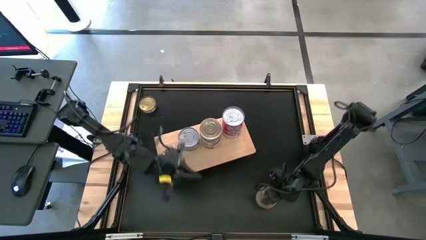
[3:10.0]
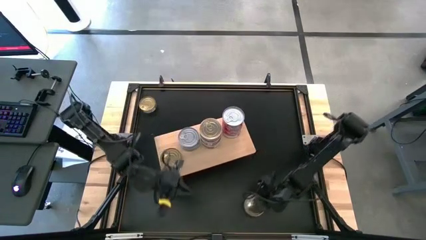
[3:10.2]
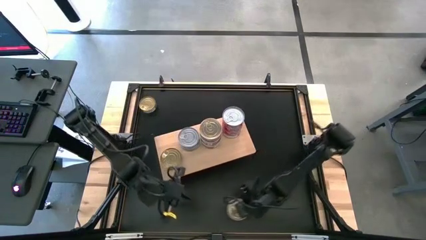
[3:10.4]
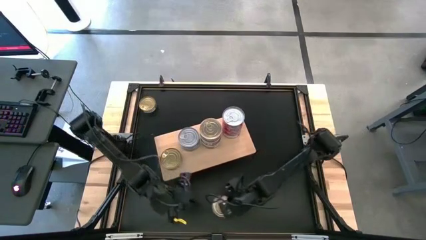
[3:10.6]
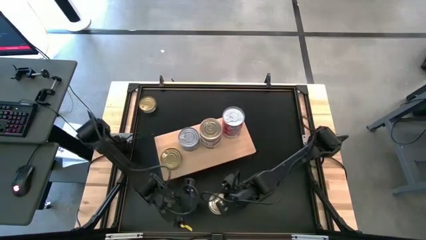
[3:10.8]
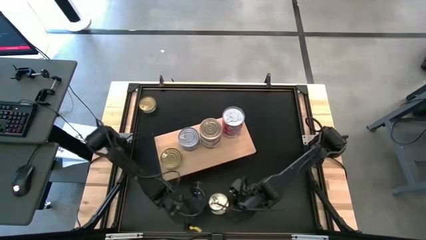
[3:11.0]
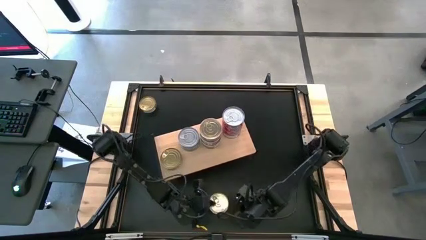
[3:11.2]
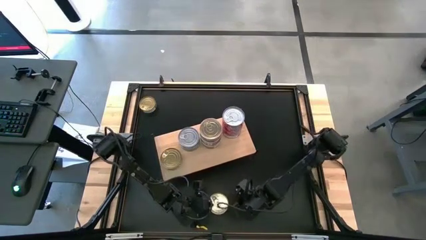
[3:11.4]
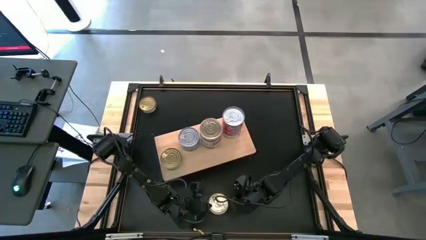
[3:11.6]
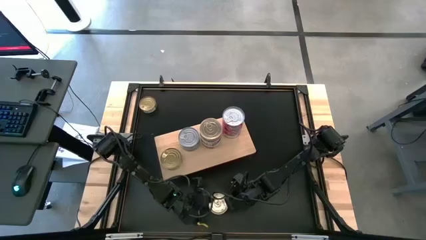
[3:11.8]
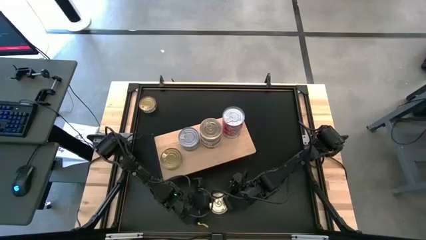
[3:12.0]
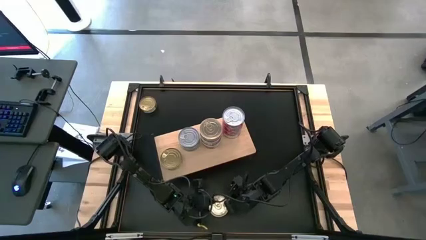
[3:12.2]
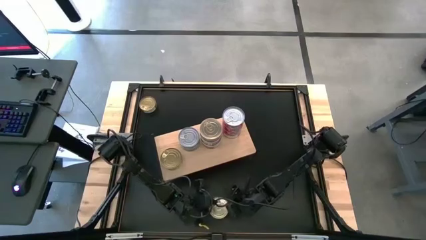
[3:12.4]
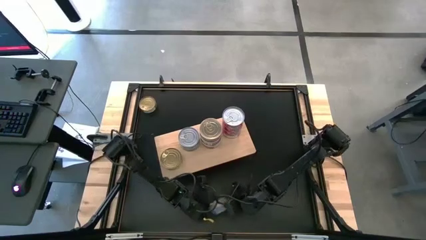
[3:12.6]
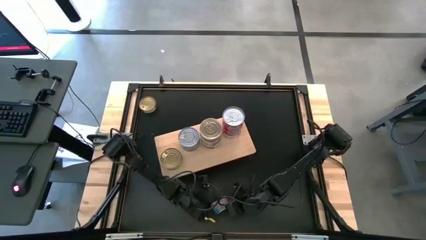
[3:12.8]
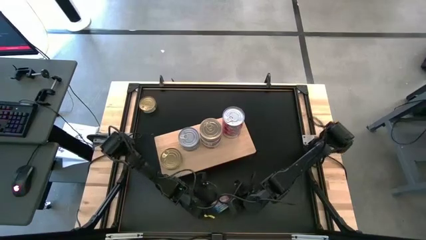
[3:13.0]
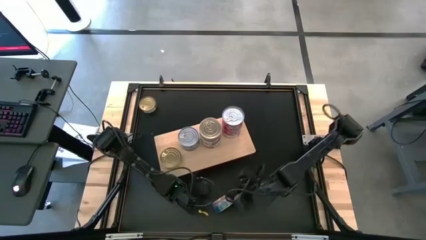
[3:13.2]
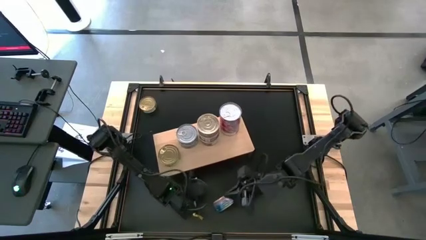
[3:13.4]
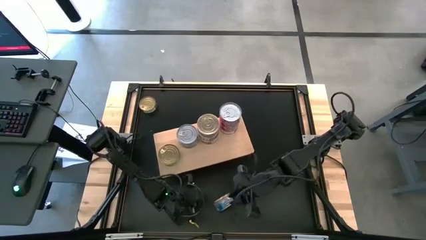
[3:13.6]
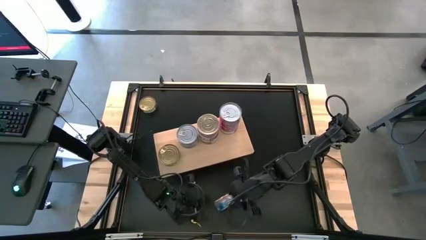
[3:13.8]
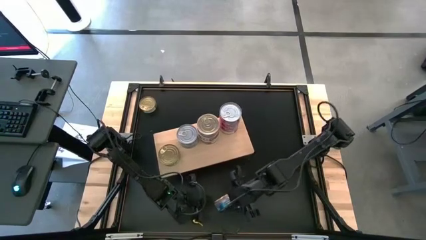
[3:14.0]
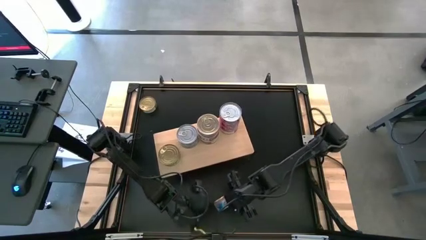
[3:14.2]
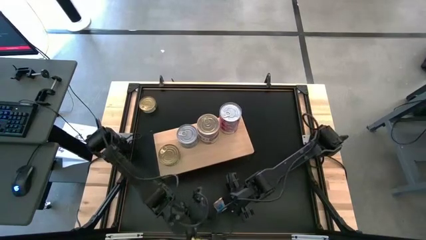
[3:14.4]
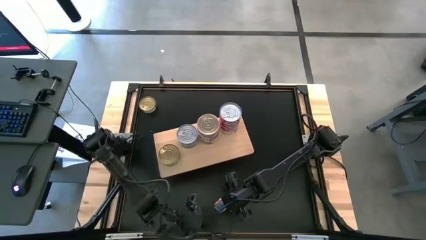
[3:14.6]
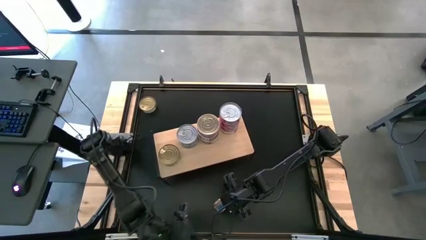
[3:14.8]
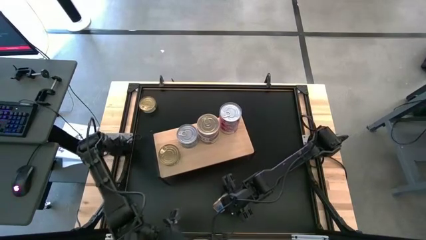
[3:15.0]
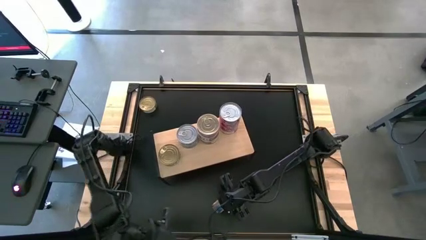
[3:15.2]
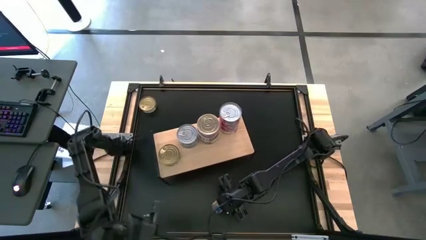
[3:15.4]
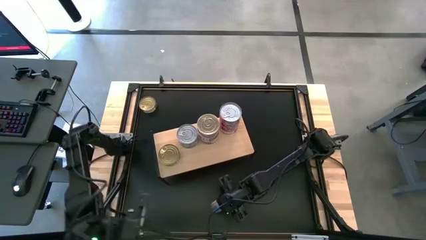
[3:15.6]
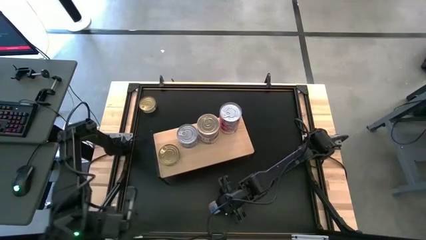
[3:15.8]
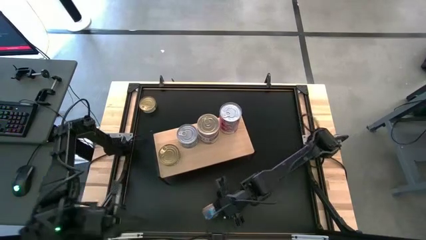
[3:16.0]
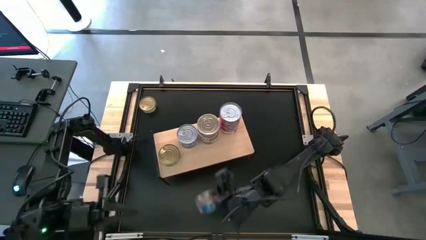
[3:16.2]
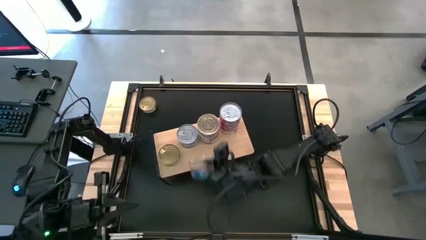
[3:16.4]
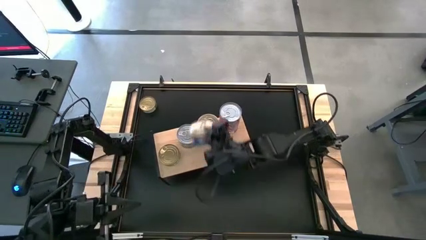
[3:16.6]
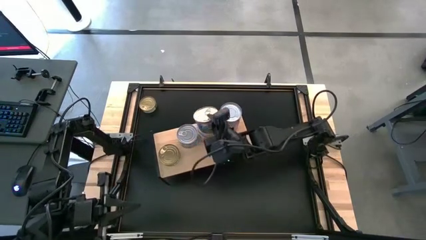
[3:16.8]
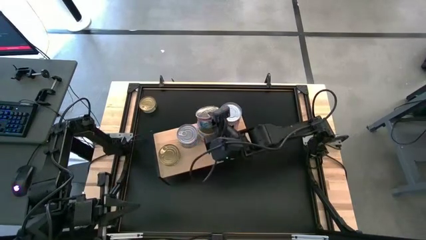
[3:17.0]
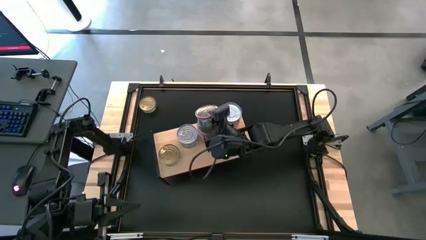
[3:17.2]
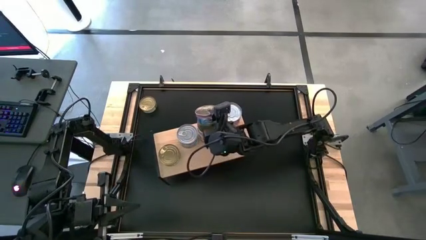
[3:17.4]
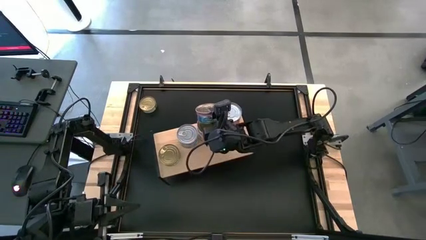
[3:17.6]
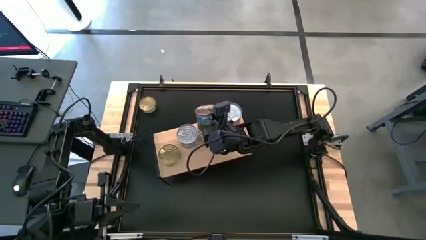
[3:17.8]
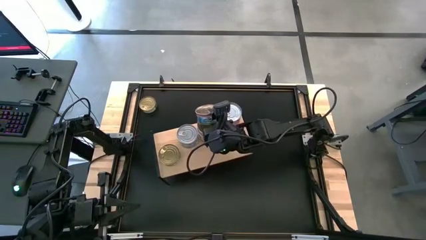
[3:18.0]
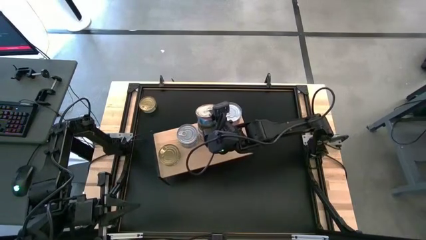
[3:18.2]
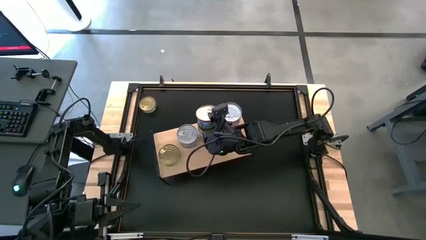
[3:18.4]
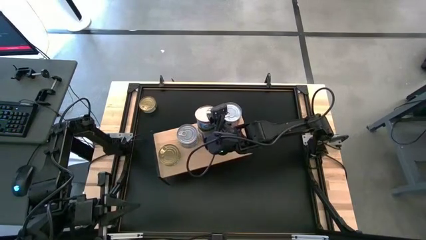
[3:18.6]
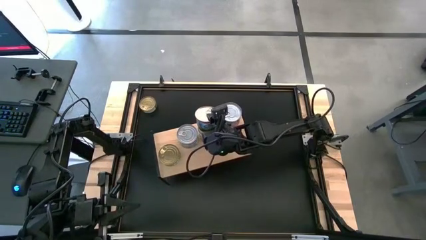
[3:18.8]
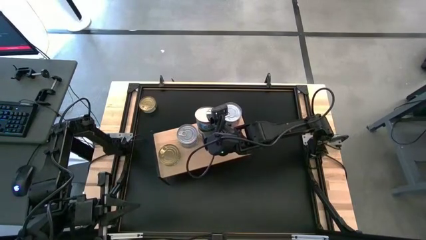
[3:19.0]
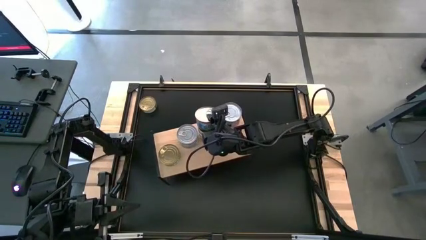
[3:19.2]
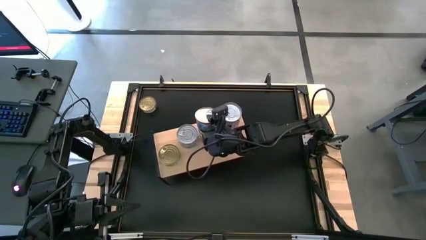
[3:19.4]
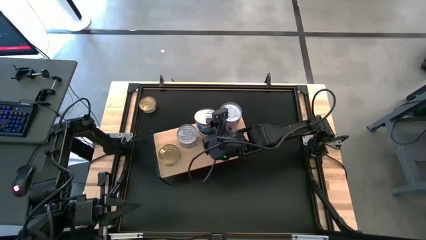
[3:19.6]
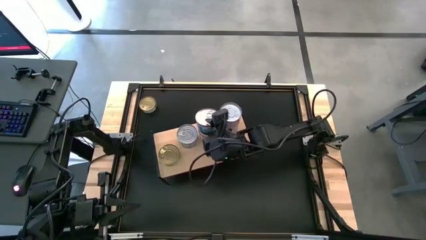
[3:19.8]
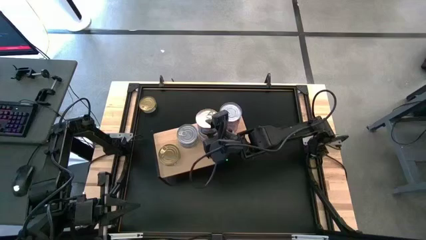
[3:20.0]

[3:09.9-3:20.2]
Task: Stack canned seafood by type on shelf
Stack the blue tuna can on the top of the other blue tuna can on the shelf

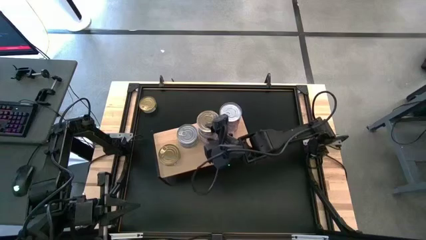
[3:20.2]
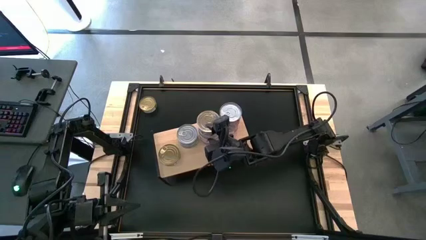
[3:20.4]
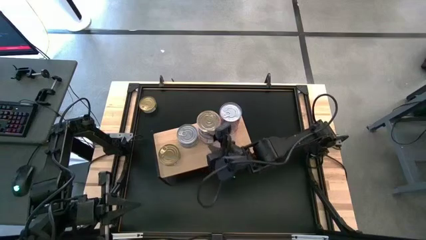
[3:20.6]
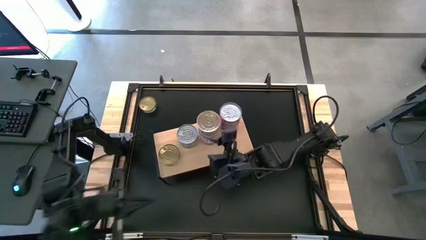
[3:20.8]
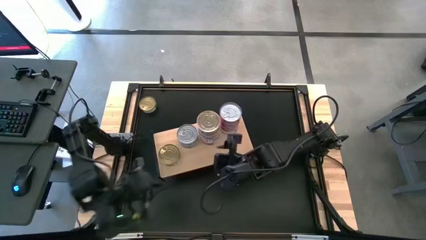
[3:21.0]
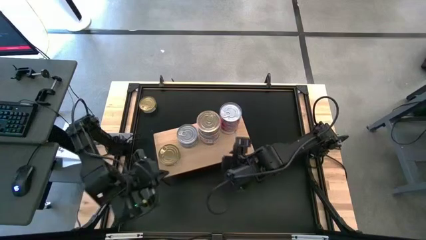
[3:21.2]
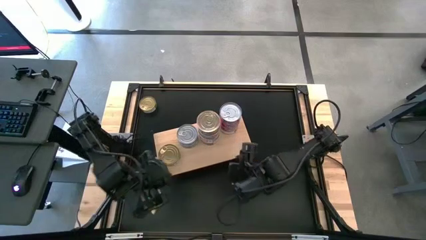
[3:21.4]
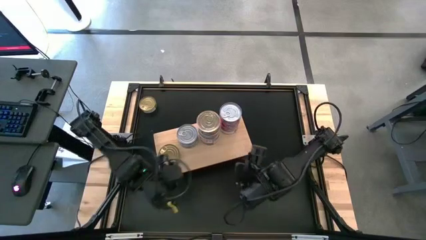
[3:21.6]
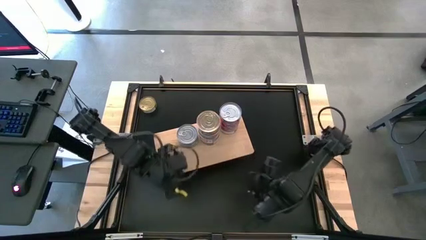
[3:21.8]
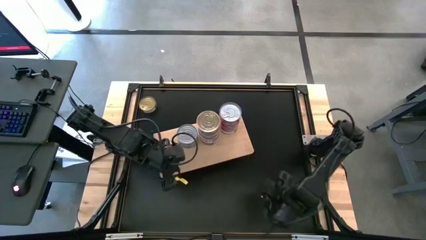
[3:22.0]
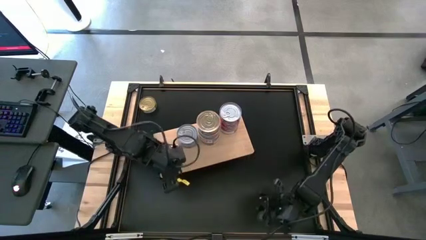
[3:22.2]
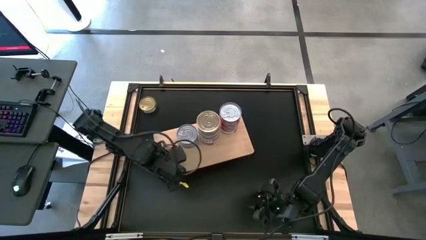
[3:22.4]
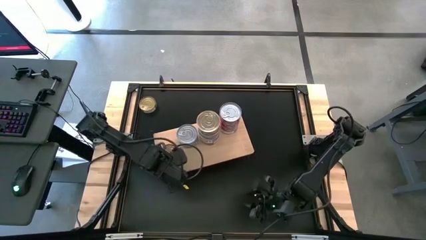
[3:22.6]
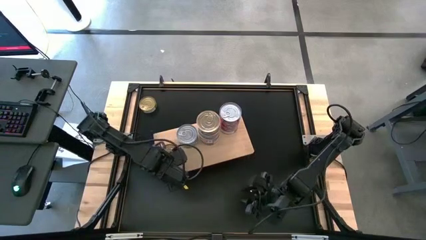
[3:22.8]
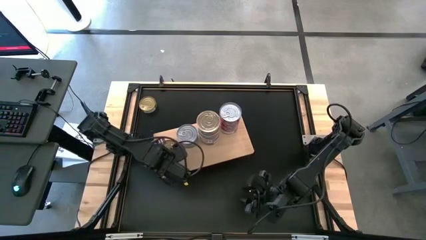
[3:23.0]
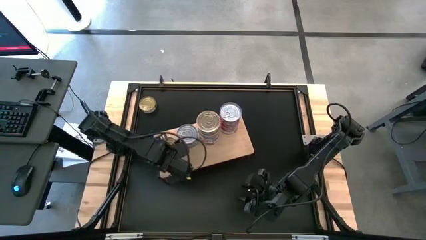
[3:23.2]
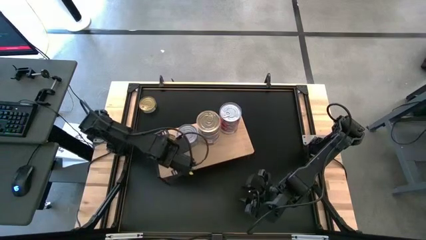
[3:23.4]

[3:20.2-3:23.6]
Adjust the green tuna can on the shelf

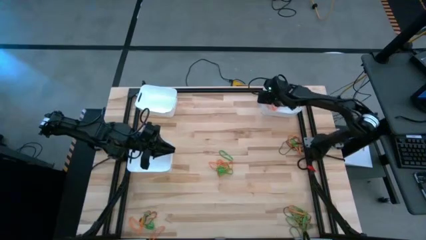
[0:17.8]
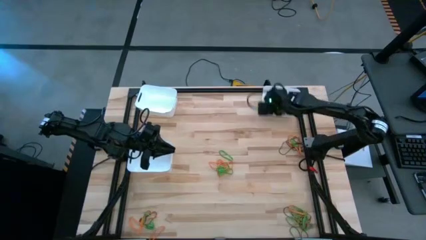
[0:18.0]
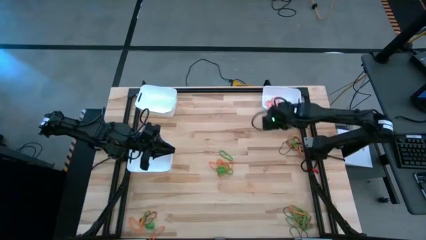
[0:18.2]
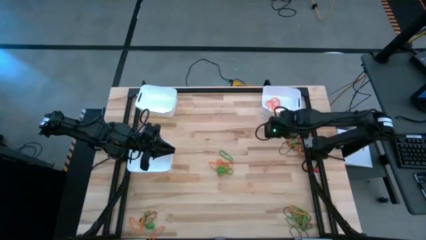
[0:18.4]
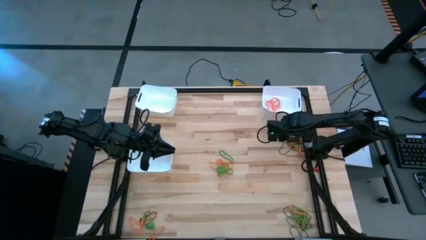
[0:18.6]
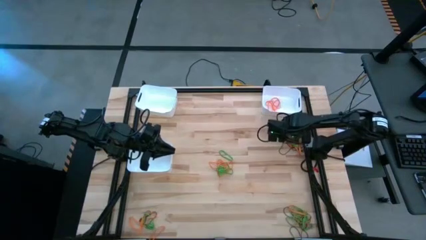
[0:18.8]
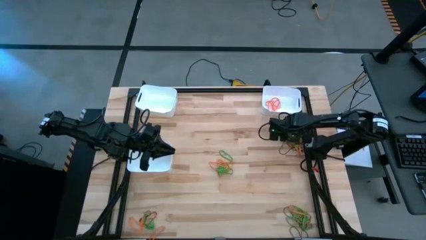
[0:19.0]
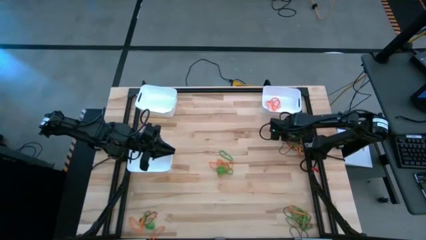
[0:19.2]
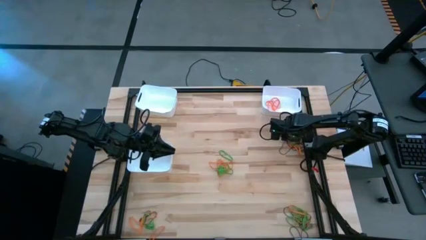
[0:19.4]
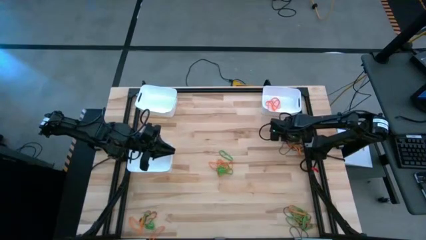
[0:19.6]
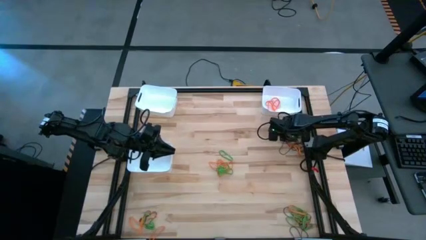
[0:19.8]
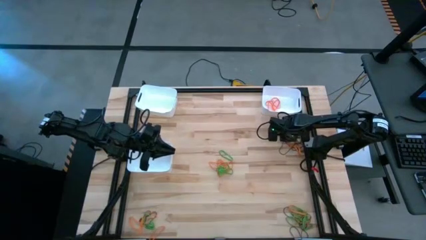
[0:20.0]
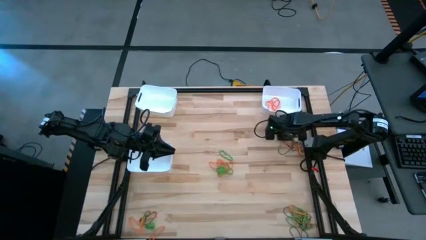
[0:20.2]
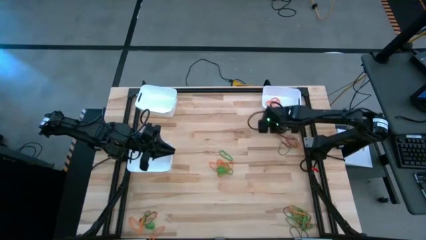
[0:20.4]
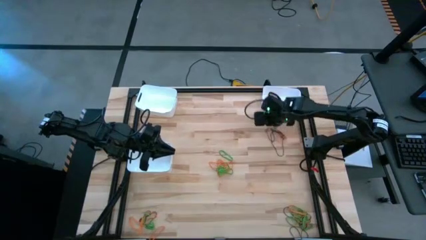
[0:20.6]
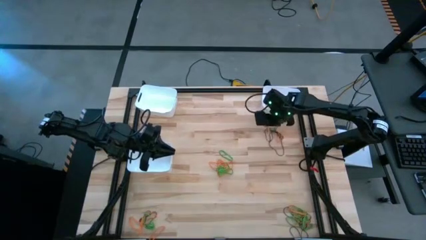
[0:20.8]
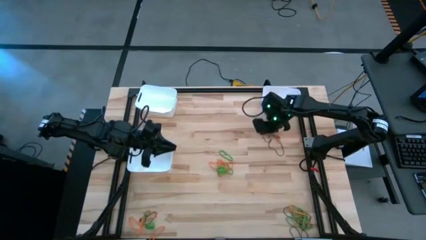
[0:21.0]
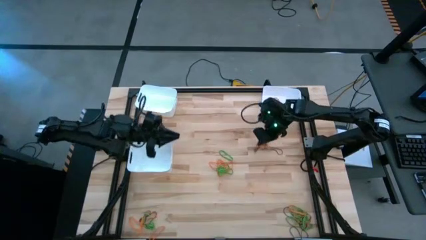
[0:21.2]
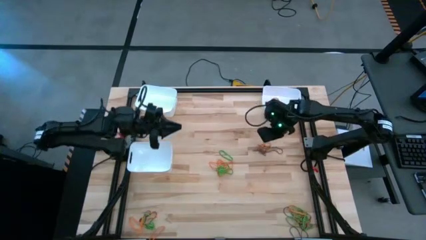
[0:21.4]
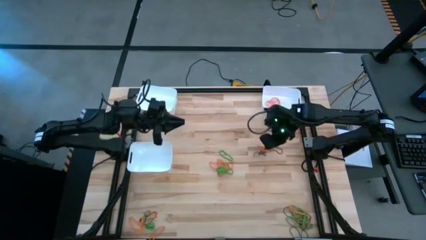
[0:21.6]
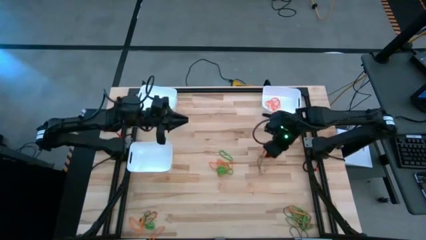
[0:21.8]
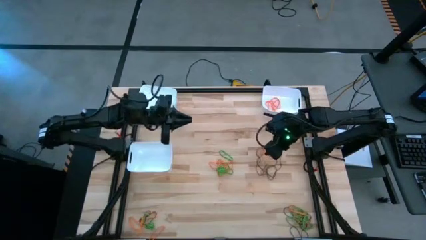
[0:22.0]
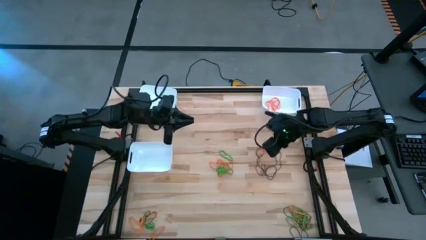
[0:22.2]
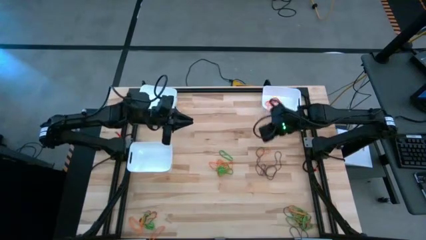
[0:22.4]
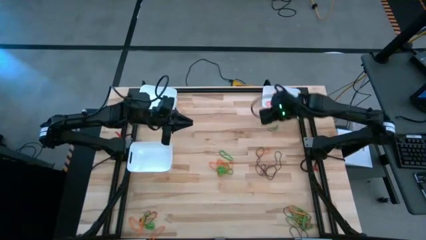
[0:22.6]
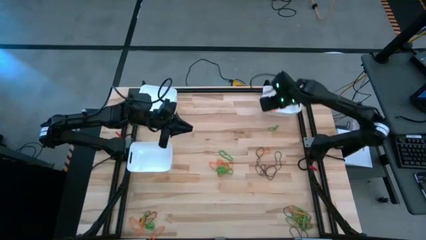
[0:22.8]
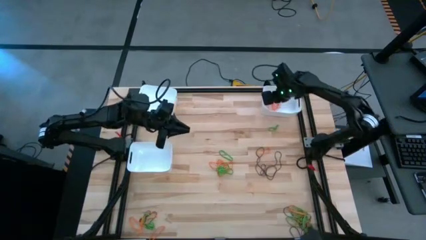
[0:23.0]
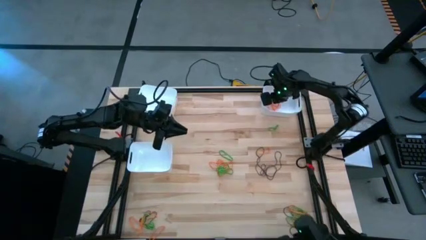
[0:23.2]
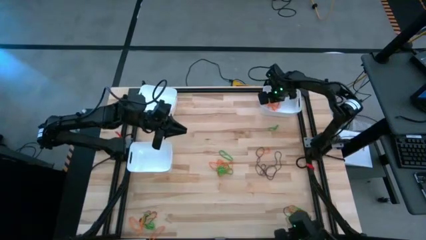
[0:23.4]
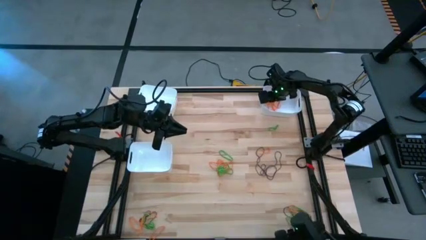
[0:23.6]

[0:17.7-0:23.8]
Task: Sort rubber bands into baskets
Put the orange rubber band into the top right white bin
